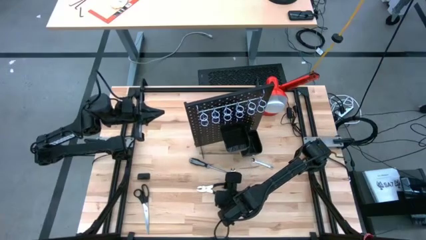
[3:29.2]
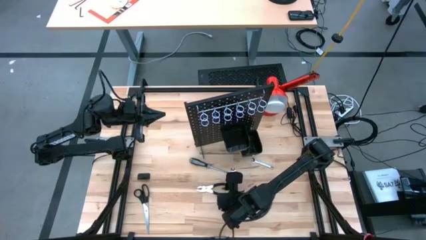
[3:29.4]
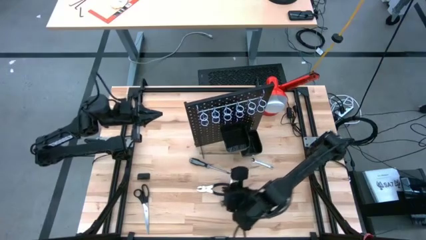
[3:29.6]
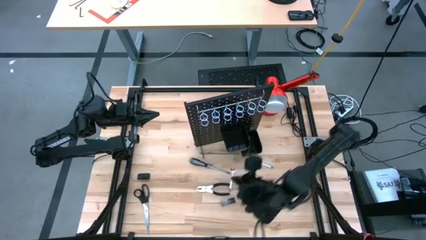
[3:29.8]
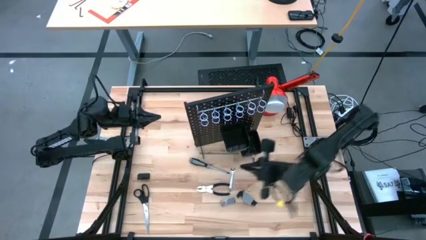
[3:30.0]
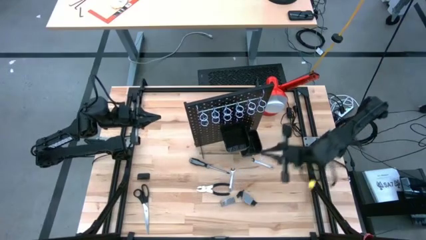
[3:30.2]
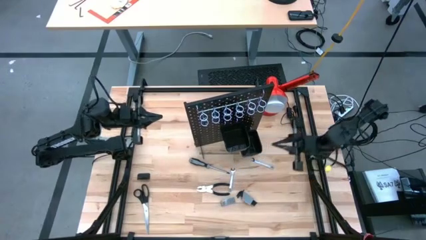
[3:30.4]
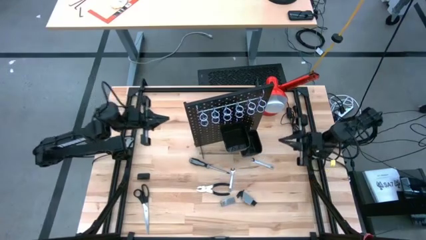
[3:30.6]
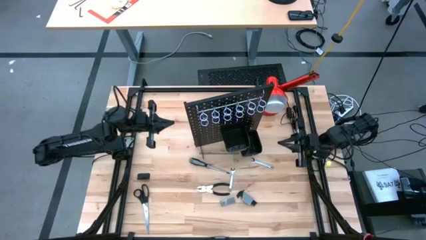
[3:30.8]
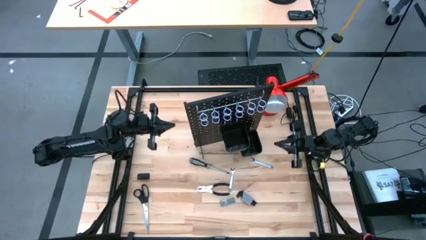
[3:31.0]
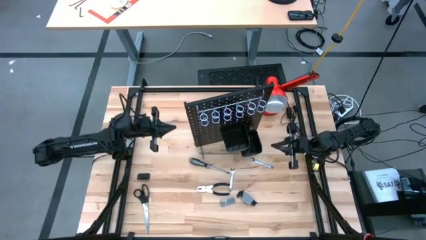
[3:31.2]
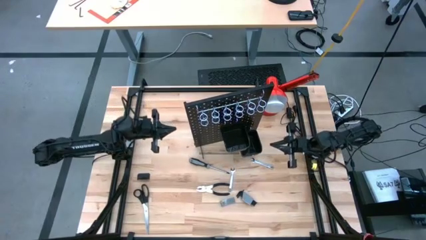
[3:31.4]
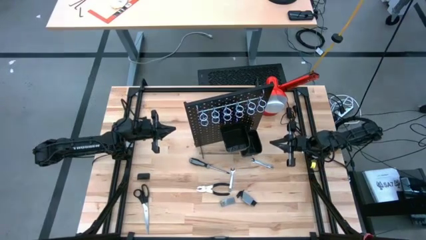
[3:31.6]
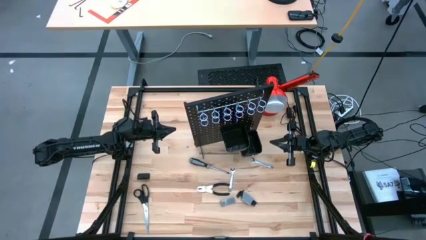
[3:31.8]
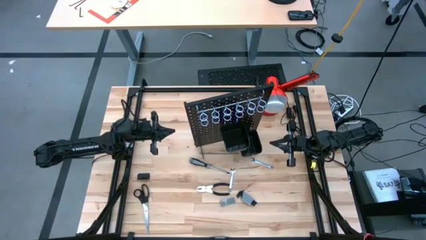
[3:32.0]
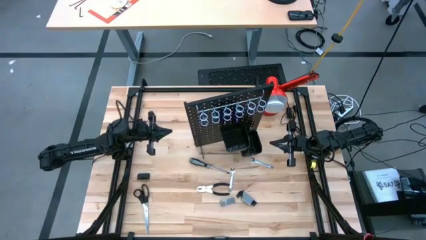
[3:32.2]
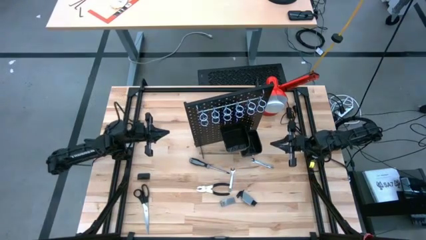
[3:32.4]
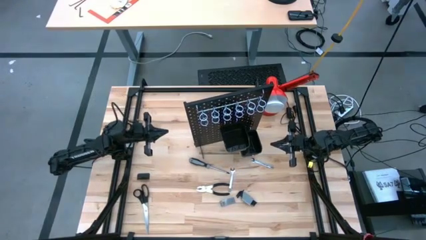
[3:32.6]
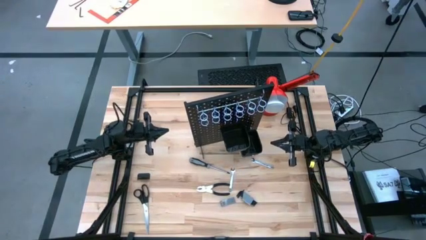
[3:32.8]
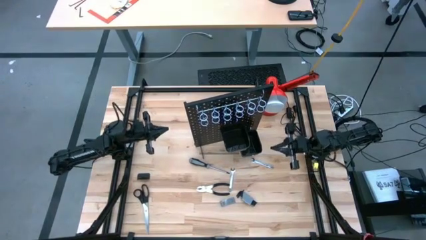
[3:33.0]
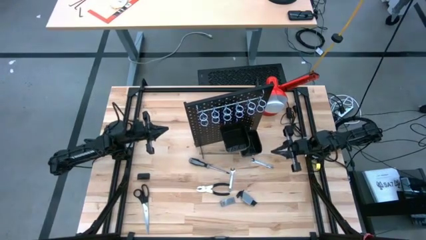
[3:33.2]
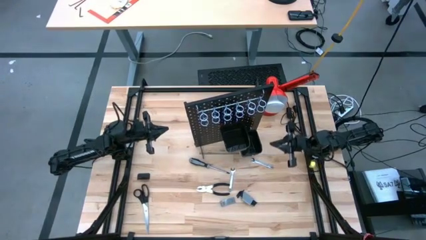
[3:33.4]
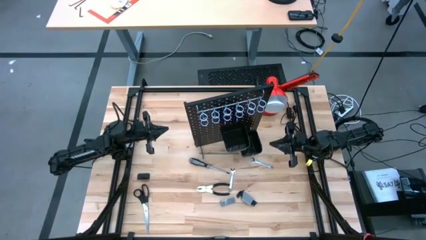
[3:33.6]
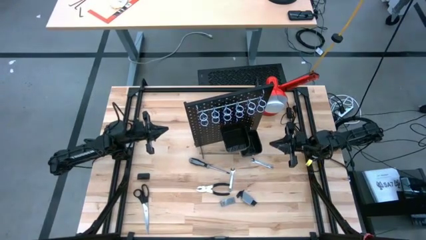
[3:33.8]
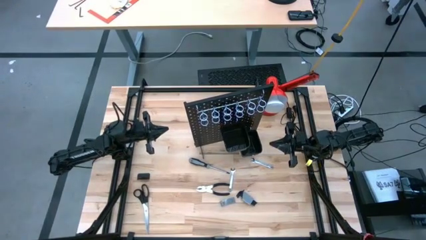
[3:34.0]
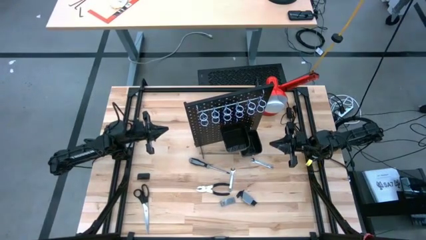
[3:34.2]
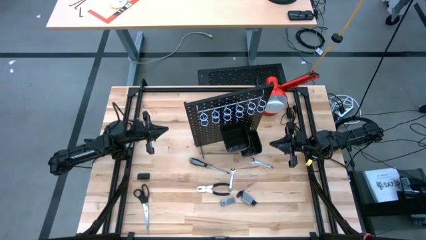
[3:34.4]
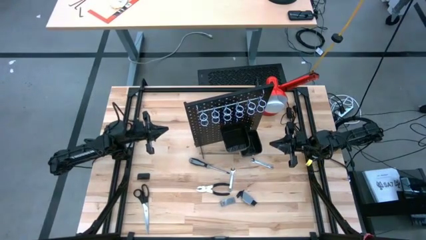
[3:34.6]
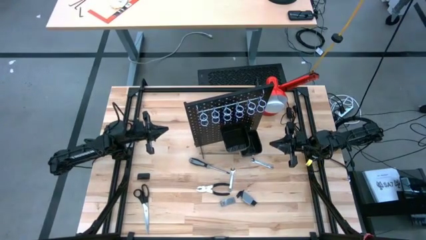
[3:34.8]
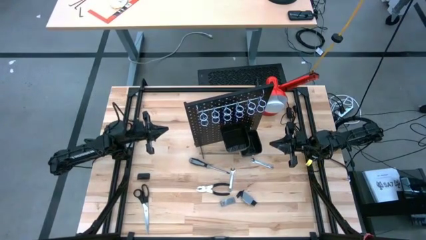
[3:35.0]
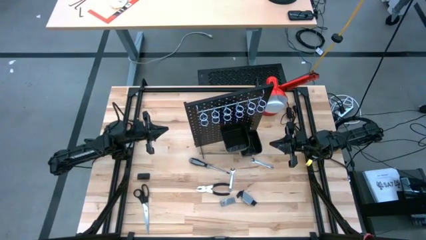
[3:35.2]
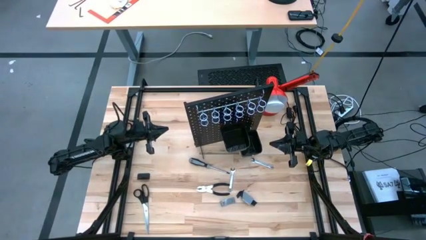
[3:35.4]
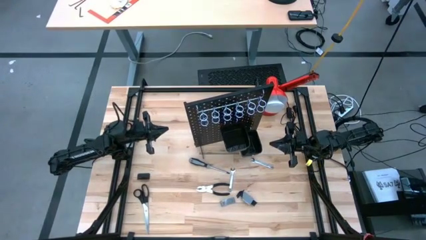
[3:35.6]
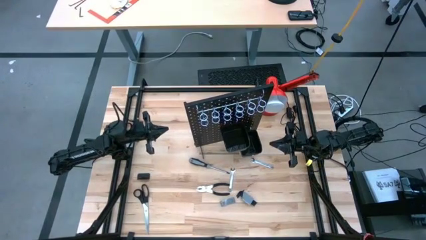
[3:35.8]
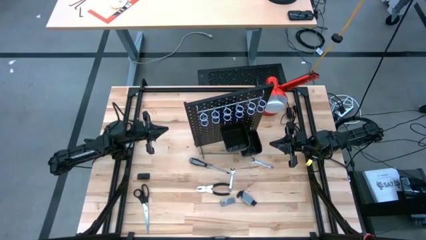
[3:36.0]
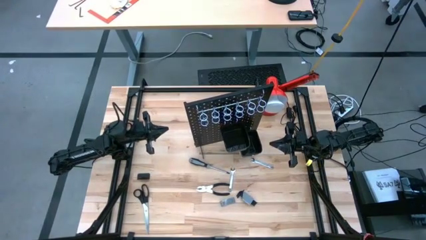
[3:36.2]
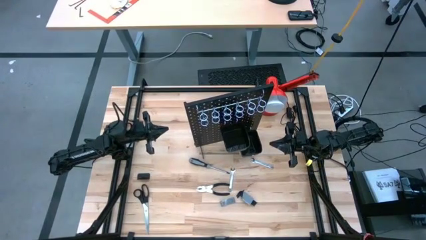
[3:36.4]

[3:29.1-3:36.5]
Task: Hang tools onto peg board
Return to Home Position

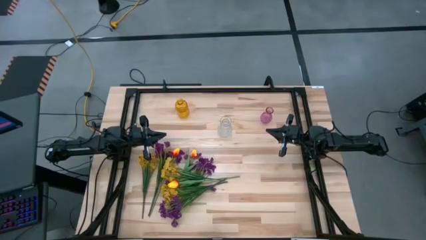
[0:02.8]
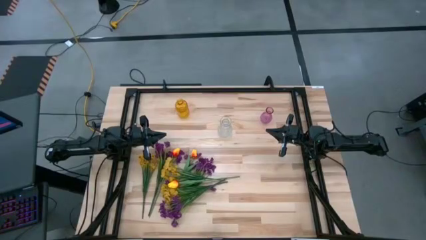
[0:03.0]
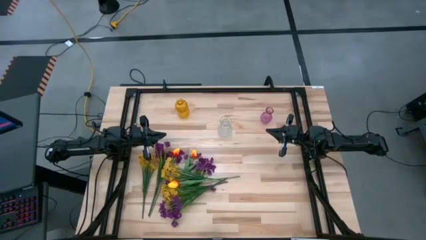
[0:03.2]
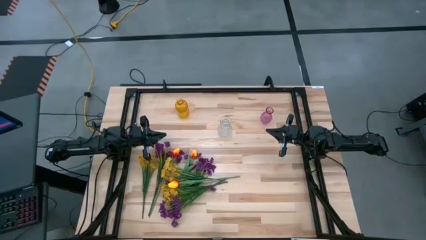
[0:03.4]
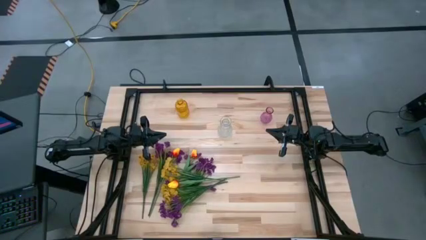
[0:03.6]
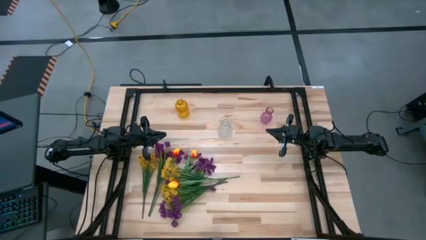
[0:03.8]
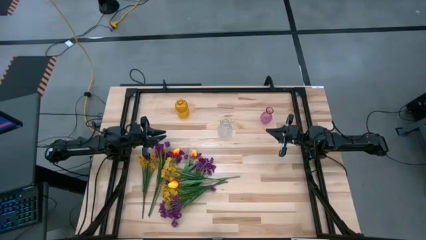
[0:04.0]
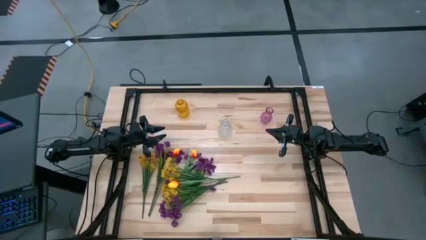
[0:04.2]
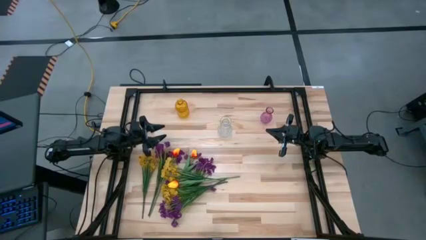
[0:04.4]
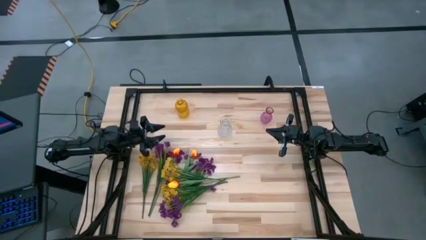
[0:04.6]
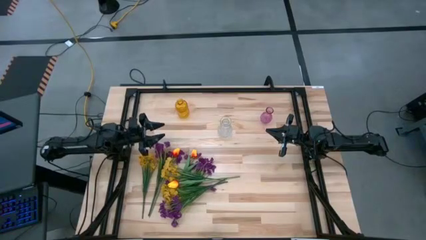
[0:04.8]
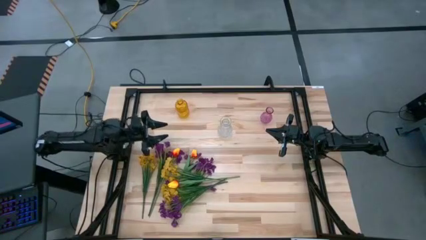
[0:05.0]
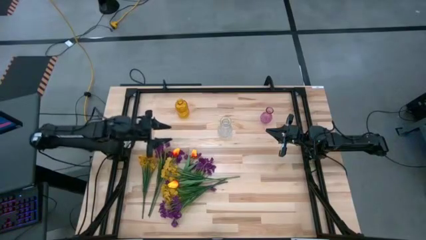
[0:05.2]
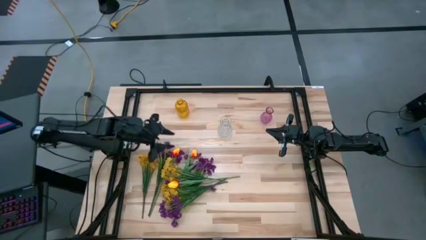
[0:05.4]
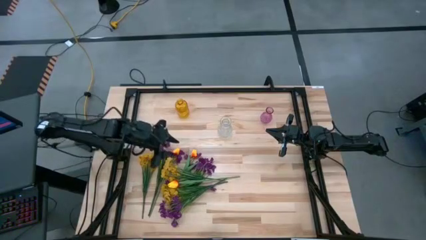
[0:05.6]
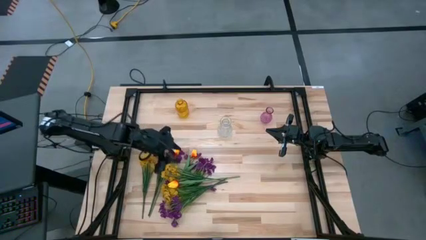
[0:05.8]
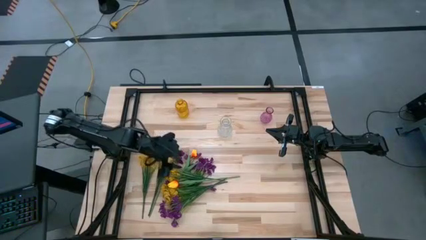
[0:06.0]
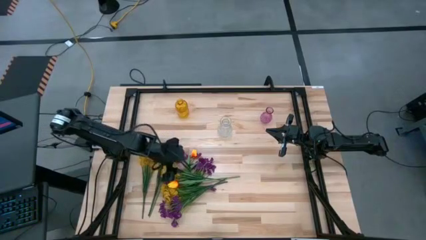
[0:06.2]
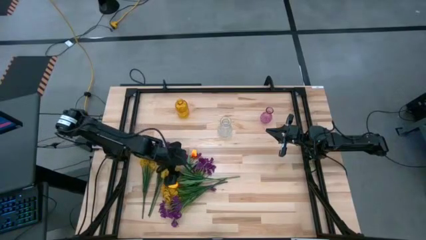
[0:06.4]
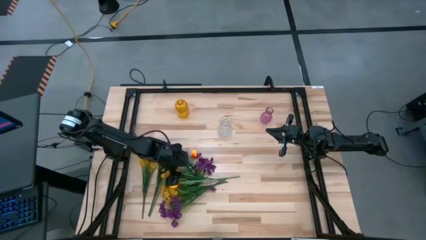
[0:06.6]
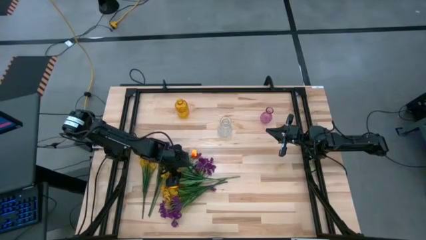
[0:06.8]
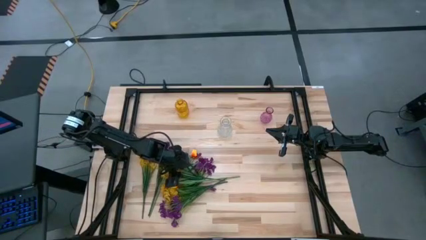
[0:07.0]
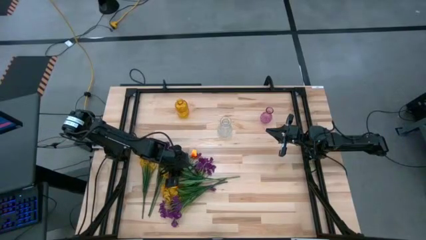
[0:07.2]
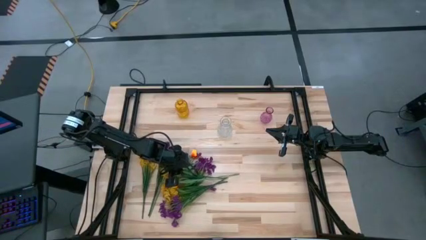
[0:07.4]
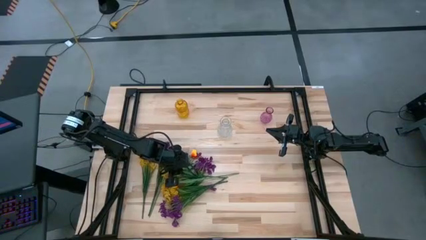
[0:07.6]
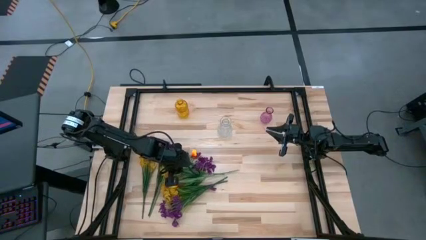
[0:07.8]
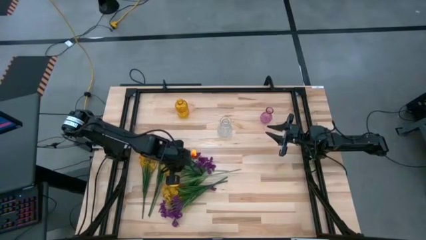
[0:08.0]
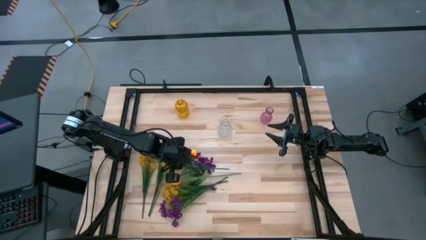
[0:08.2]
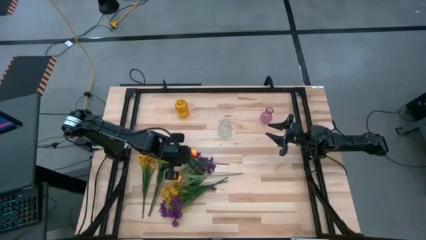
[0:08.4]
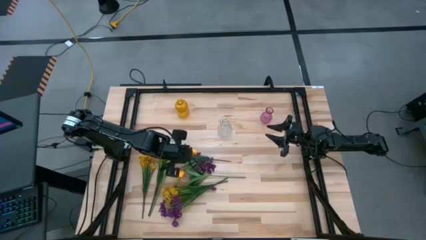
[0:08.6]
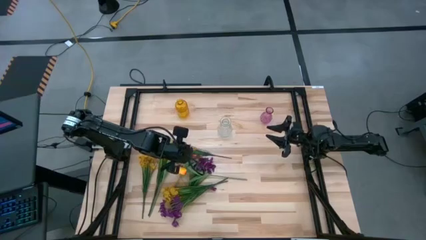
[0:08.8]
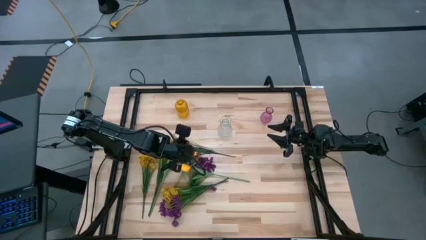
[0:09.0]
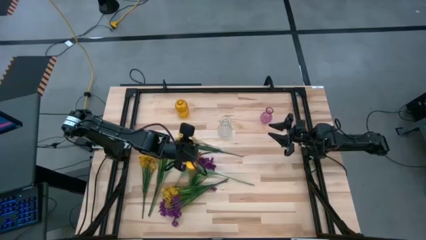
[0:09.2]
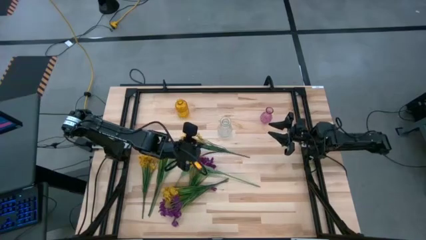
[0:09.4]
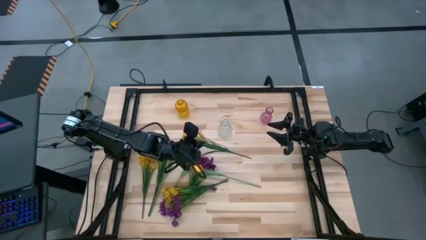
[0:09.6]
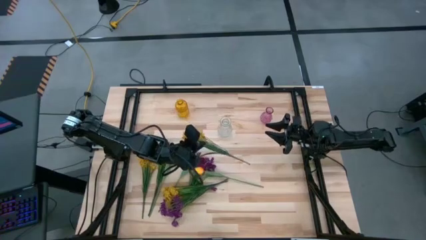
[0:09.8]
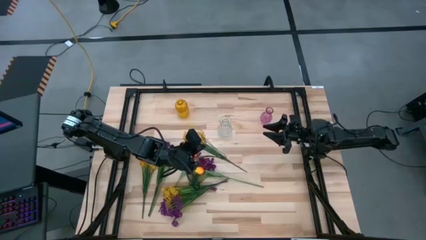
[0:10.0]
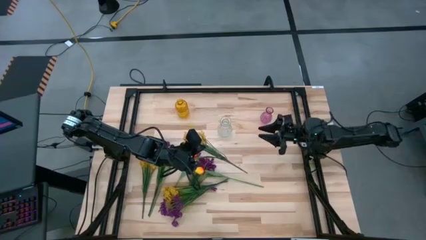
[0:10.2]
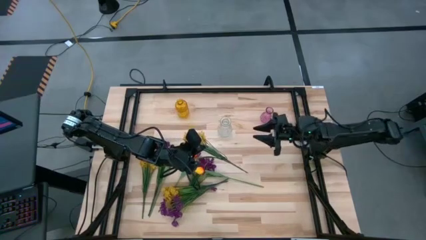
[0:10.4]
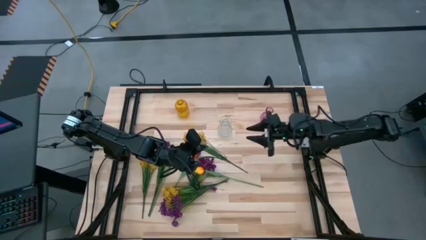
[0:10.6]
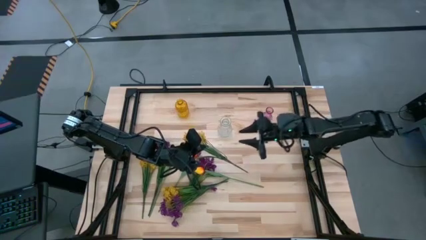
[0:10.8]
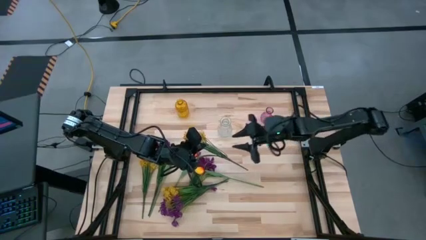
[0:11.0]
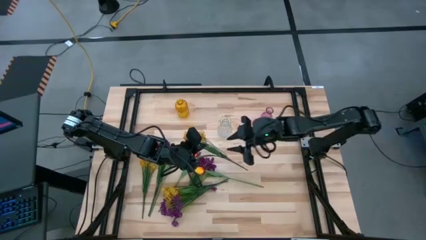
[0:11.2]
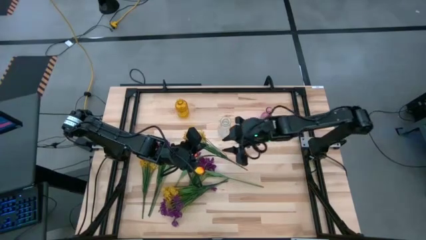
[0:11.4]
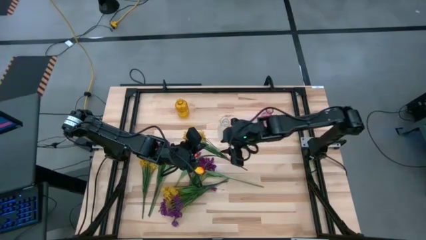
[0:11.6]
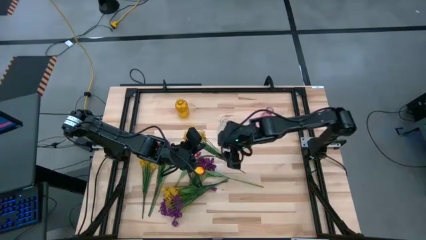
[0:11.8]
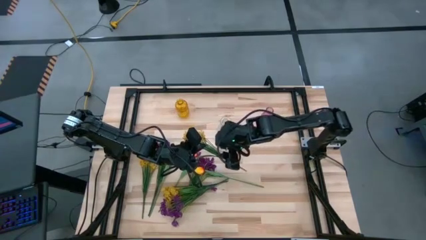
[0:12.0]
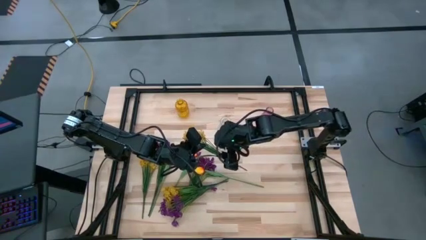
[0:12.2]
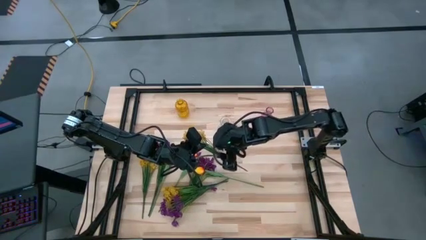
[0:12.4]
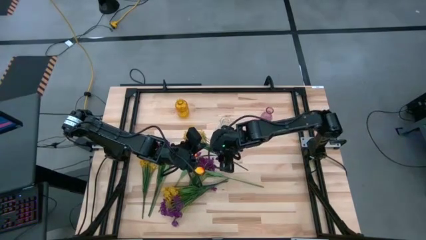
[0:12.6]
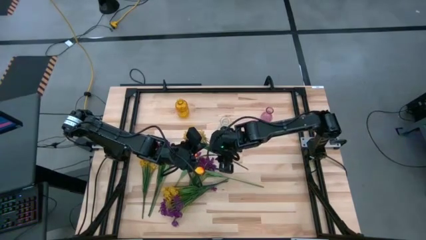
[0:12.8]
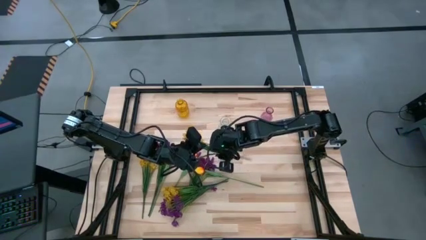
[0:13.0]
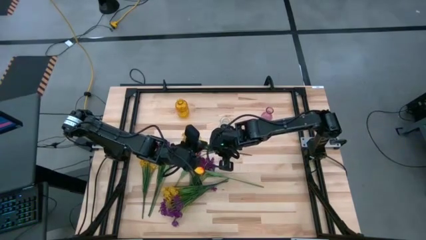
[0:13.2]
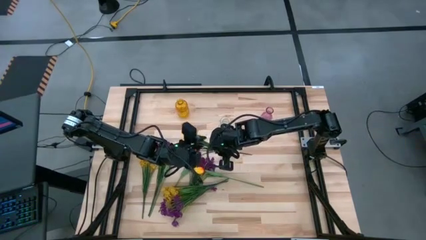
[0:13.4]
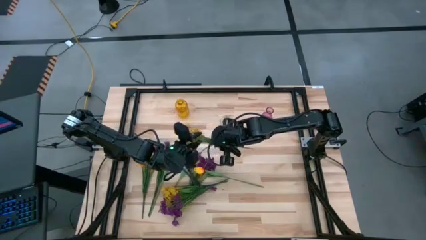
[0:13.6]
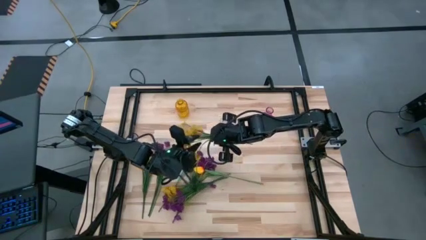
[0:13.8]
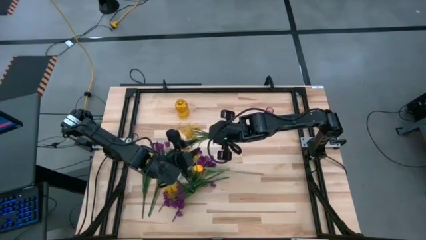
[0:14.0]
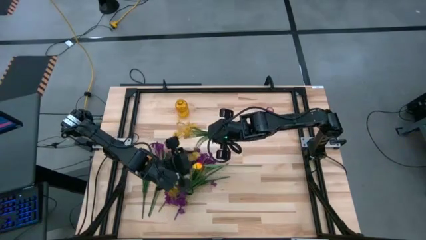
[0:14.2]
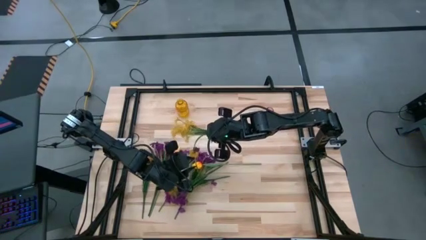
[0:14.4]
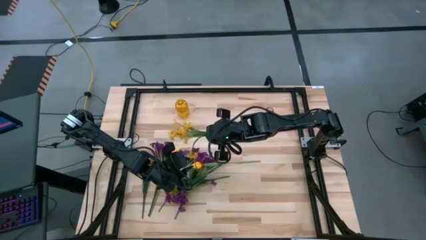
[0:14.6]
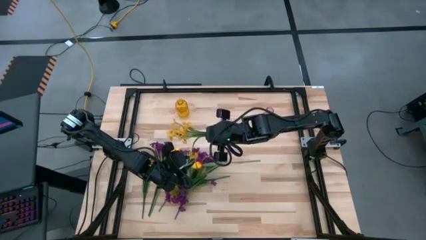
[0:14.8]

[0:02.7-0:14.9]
Task: Sort flowers into vase by color
Put the yellow flowers into the yellow vase
